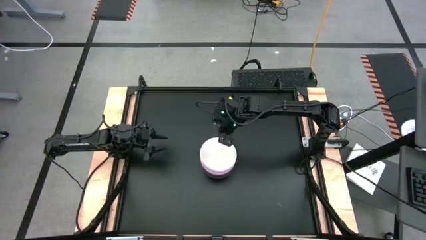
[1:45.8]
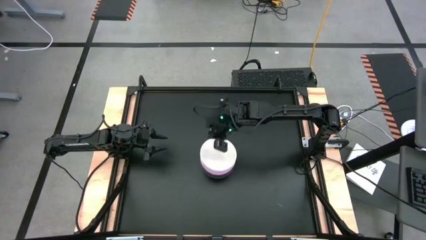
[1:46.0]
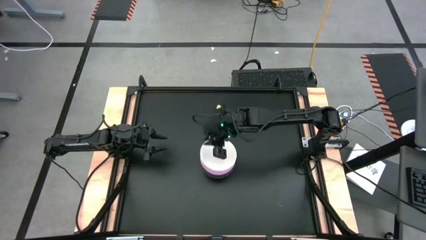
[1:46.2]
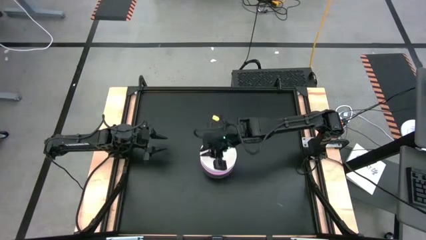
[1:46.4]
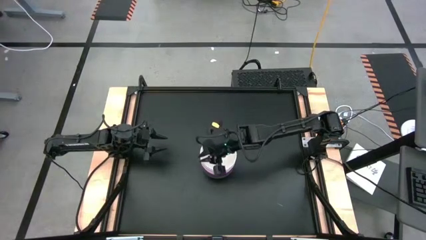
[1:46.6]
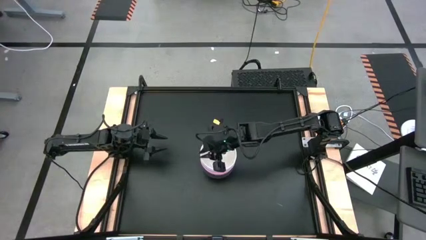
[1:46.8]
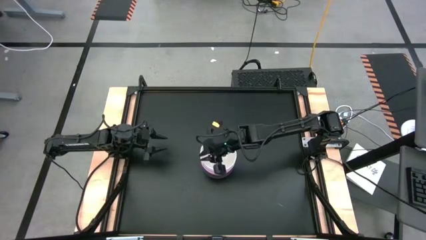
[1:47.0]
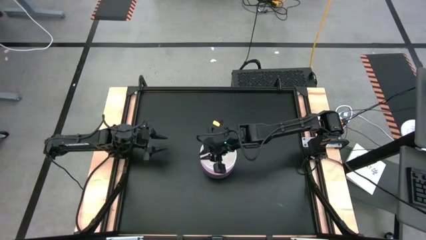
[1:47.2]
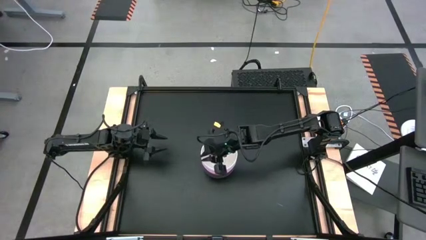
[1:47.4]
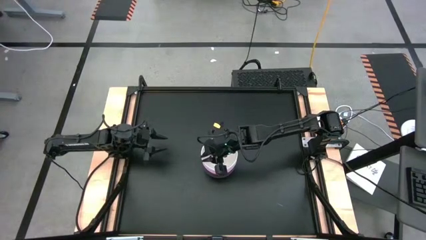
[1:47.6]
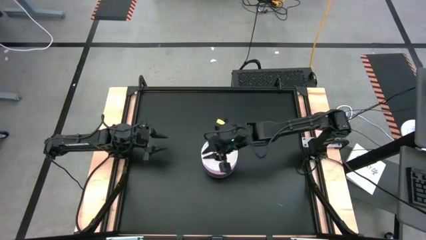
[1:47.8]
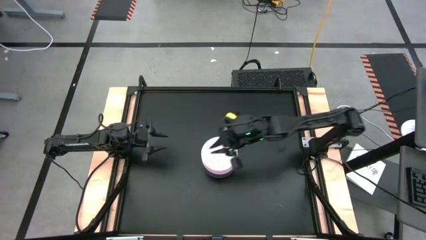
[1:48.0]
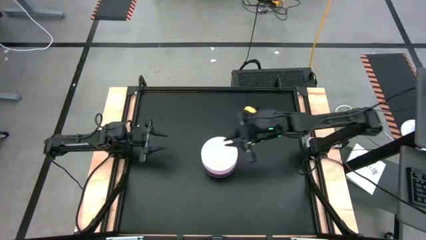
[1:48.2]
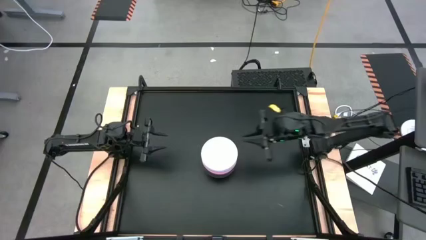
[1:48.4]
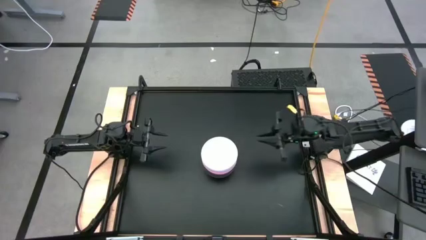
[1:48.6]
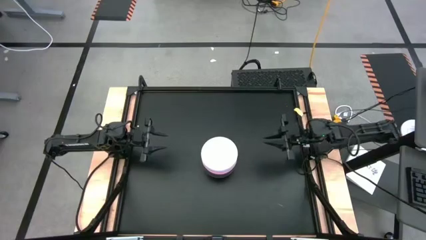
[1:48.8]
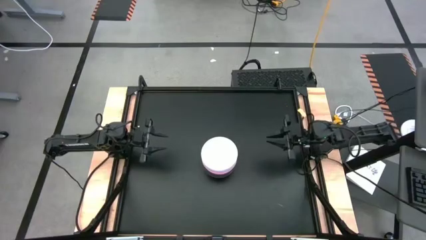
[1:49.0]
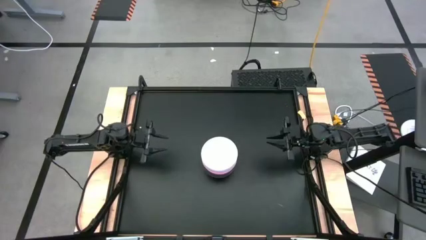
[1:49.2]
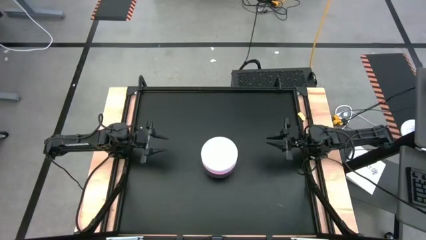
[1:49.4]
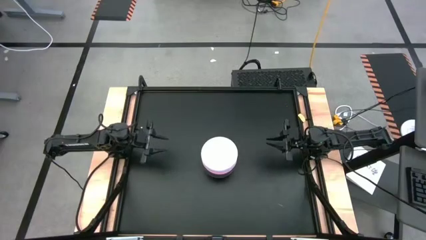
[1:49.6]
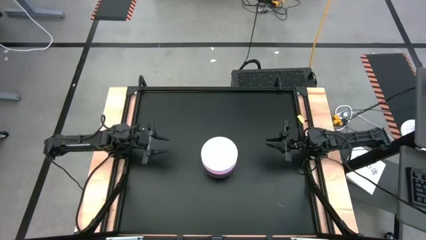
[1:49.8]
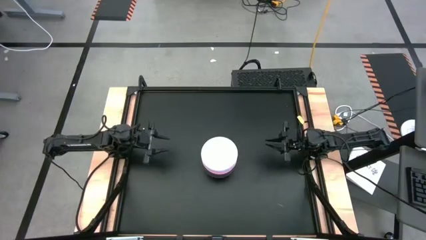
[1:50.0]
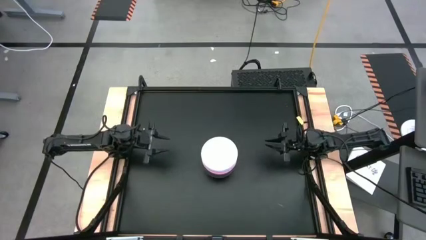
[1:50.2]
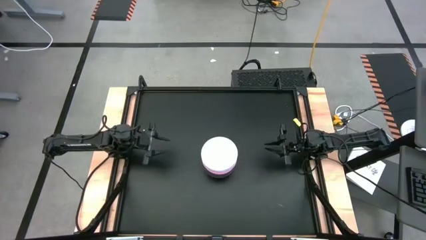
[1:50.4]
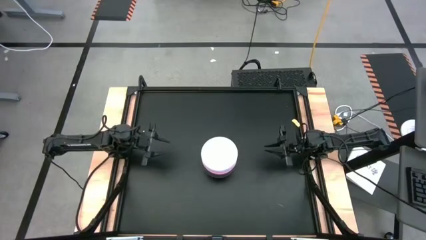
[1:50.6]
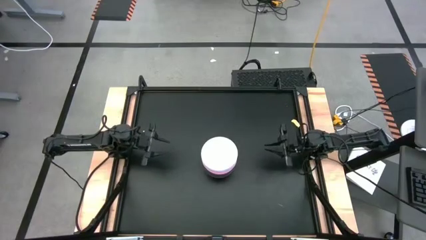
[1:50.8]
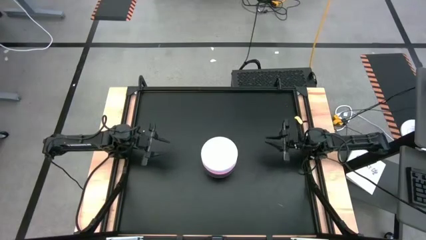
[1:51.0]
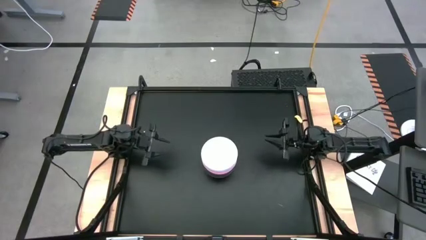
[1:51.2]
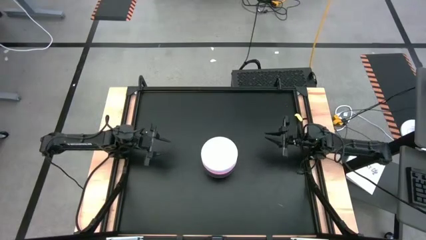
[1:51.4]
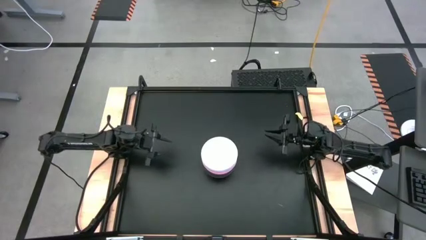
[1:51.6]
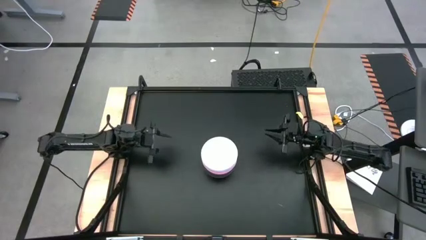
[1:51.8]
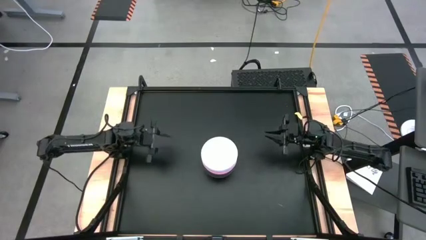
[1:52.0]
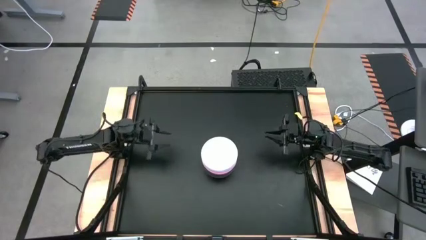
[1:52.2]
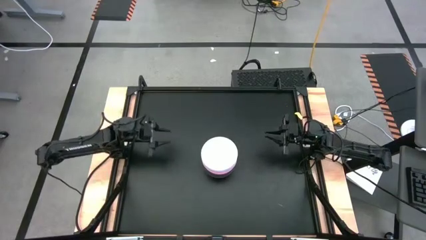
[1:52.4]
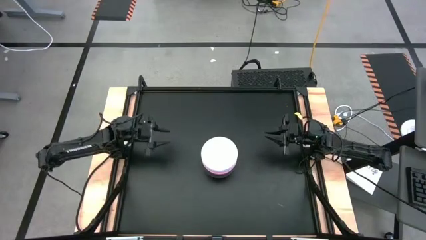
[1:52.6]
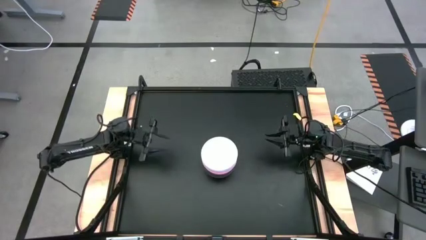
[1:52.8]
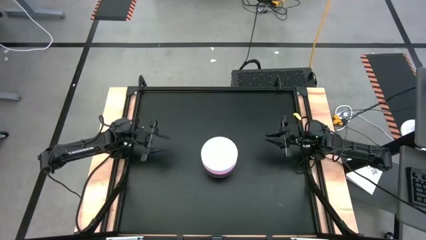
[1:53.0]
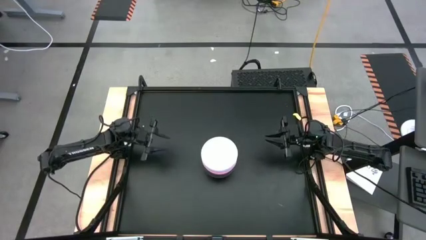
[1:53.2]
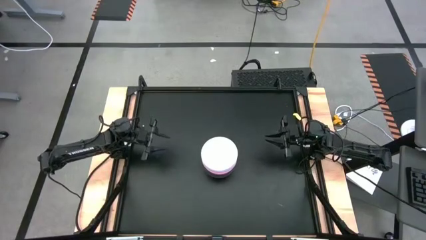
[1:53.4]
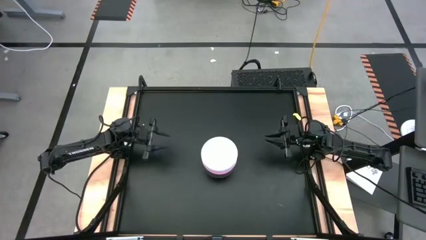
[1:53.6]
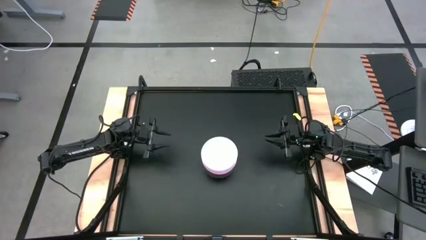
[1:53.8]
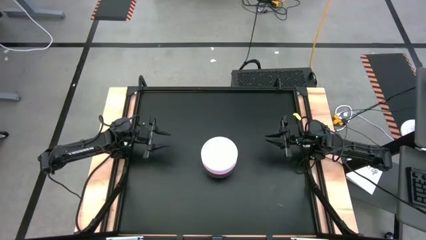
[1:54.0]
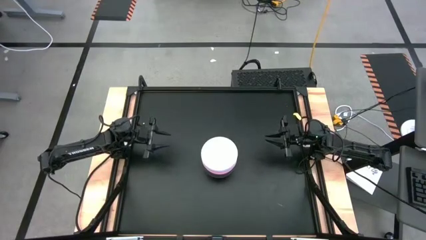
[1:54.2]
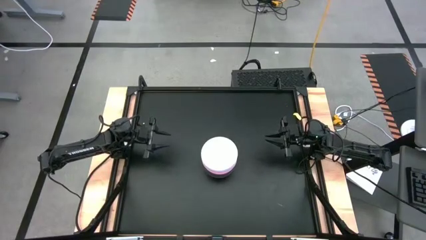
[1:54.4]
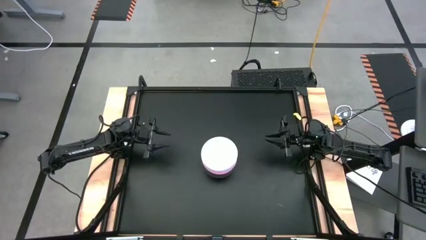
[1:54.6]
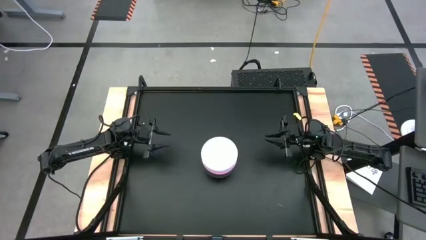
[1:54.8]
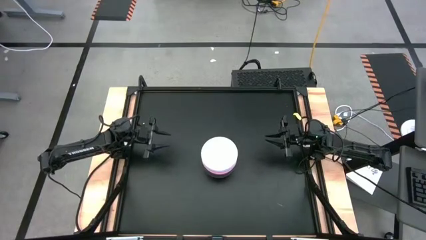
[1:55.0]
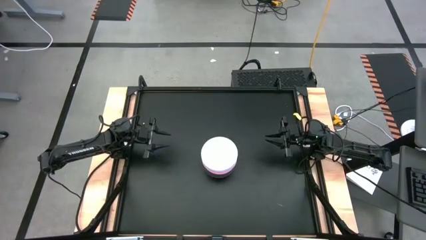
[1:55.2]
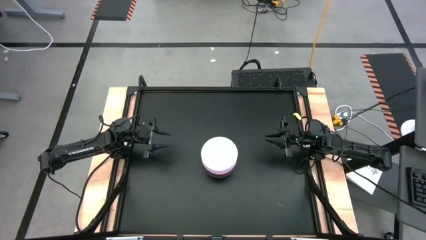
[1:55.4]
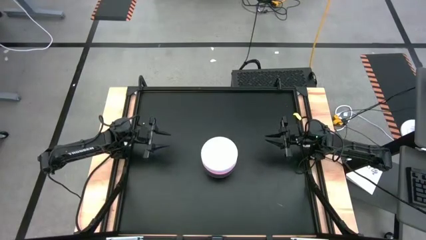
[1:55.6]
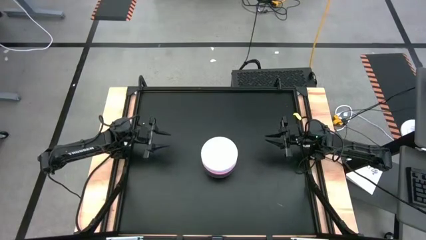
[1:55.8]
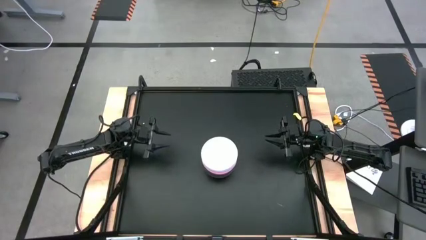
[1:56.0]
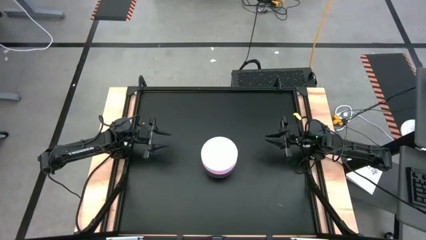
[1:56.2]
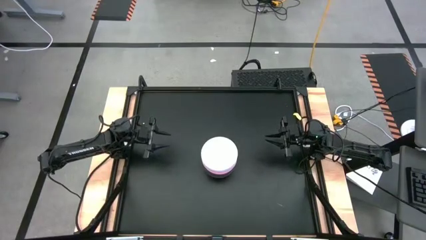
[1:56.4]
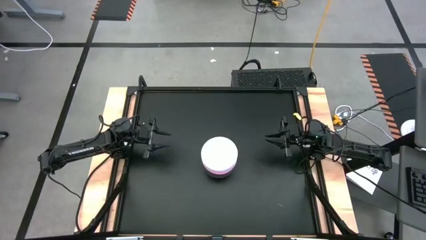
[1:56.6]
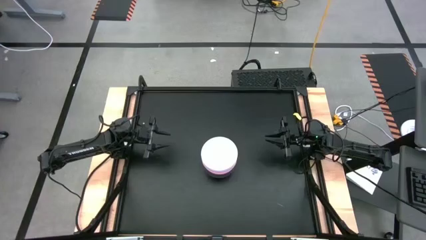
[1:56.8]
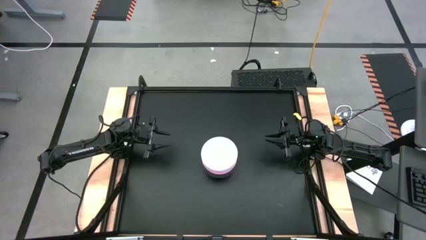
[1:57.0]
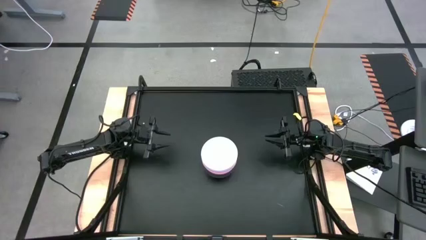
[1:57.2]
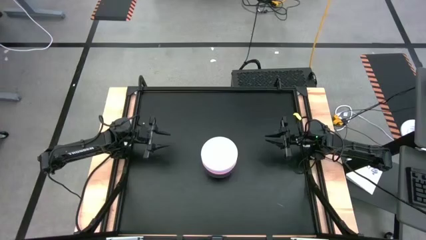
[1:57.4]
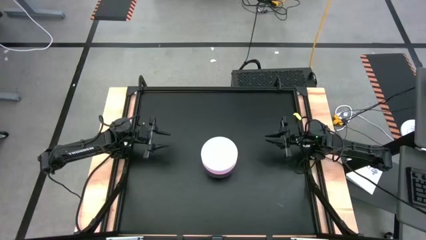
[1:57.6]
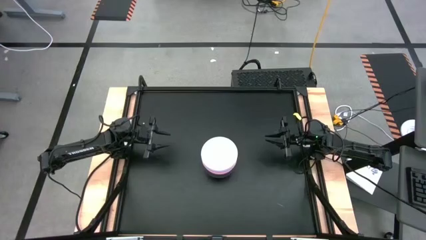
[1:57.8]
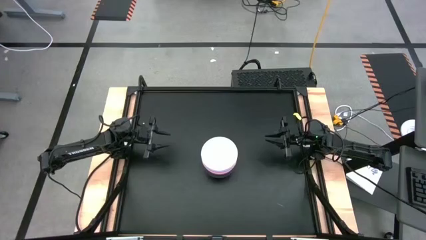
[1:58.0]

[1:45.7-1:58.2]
Task: Nest bowls inside each other
Return to Home Position

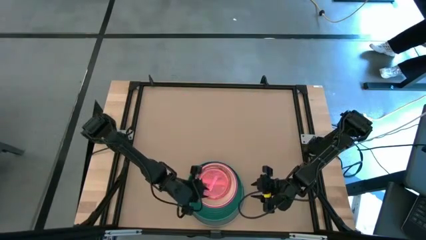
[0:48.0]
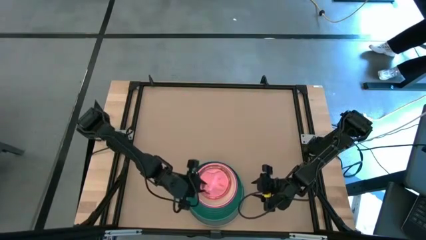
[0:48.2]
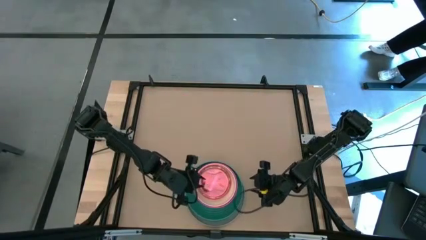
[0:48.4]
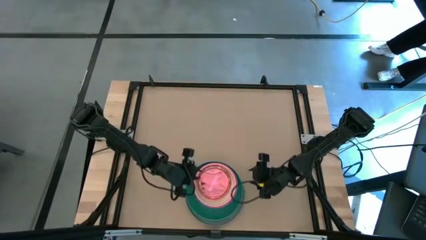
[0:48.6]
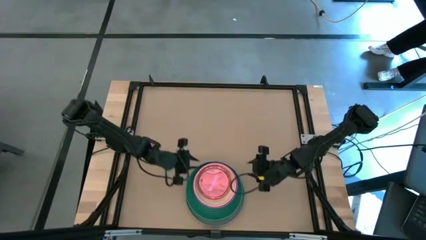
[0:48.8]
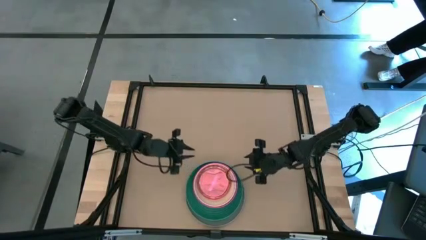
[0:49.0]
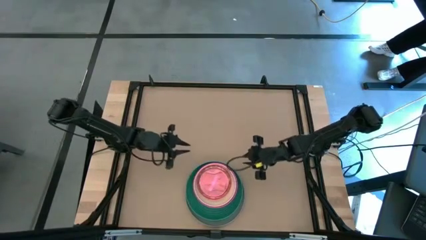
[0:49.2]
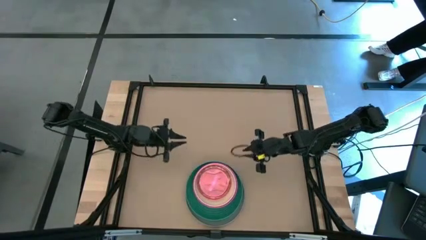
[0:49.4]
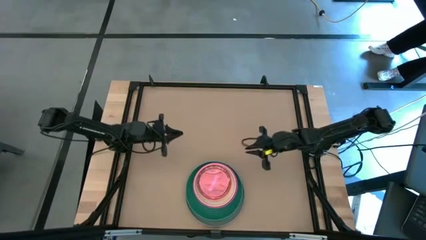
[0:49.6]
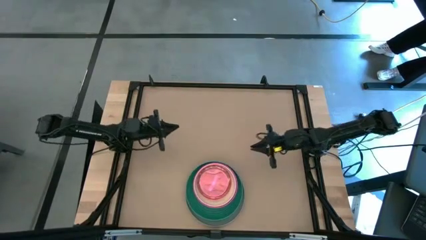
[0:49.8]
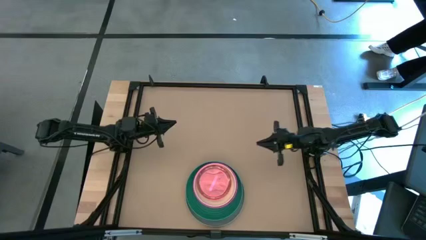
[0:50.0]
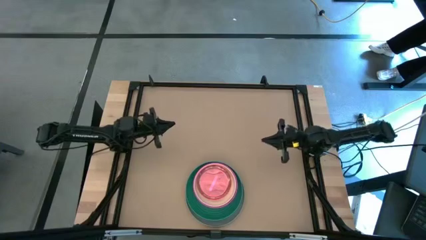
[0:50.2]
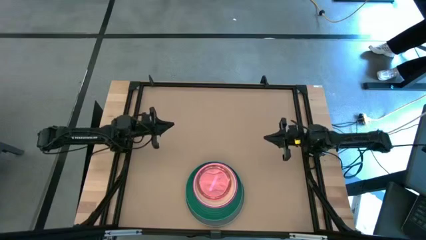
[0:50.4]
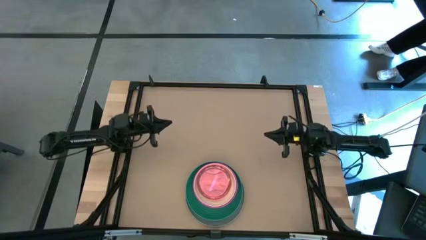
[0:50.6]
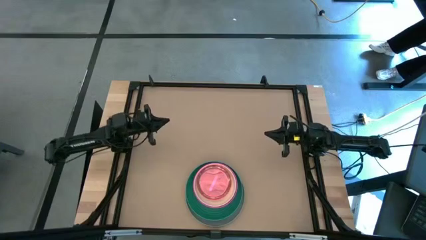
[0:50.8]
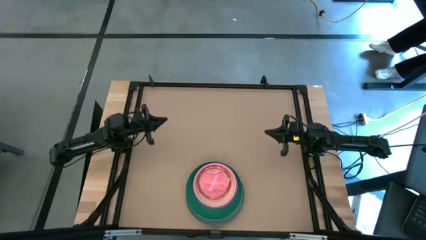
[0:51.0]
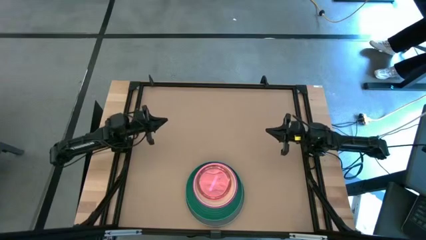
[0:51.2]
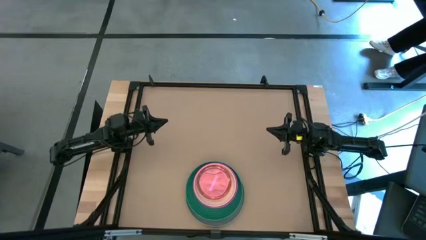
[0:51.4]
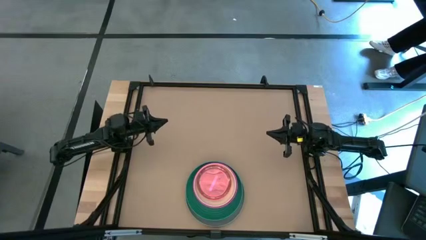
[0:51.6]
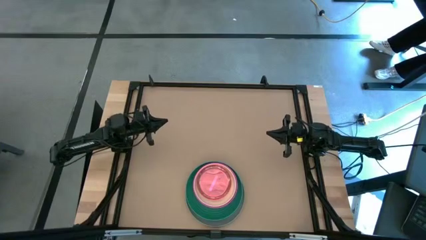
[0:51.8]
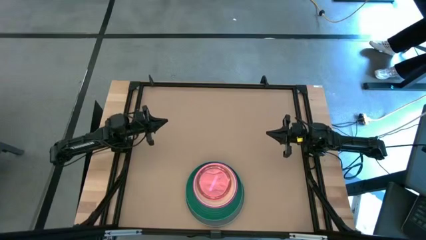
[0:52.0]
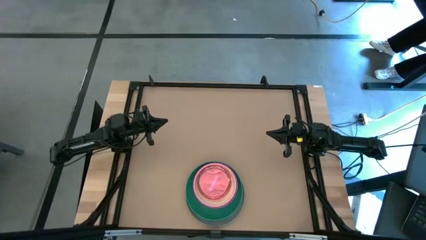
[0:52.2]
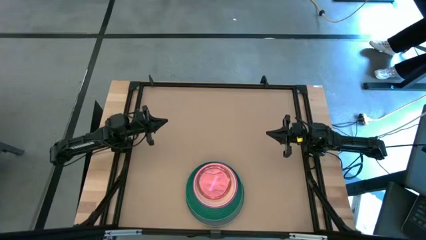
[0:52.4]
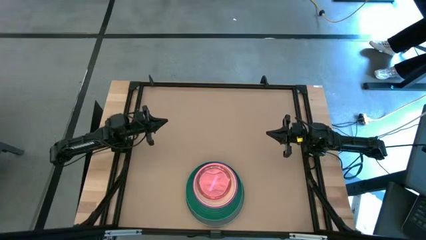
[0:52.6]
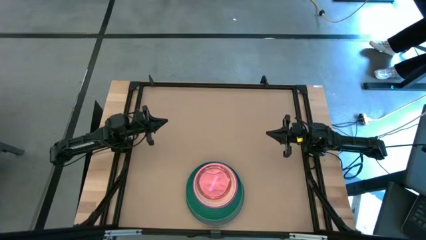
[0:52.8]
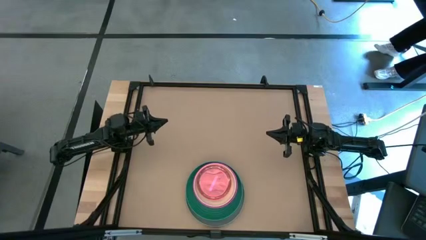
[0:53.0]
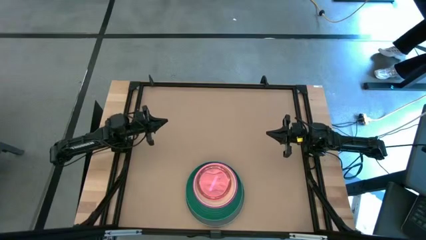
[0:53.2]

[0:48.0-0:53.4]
Task: Stack plastic plates
Return to Home Position
